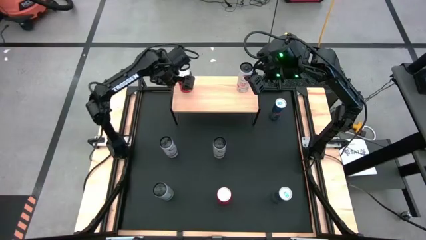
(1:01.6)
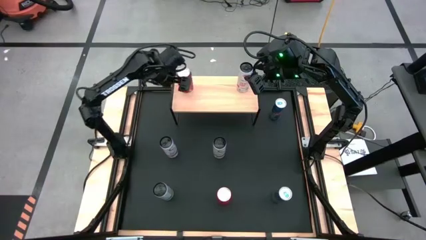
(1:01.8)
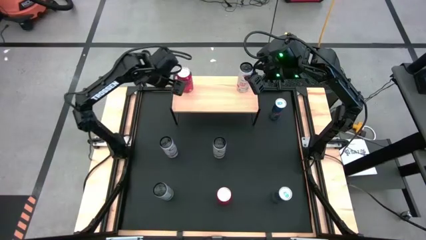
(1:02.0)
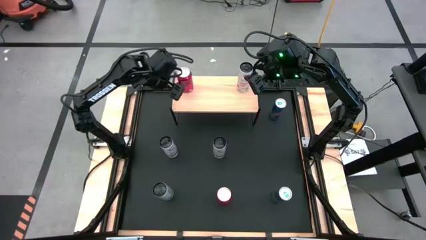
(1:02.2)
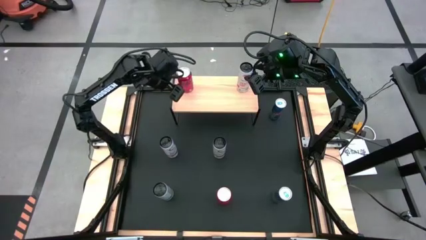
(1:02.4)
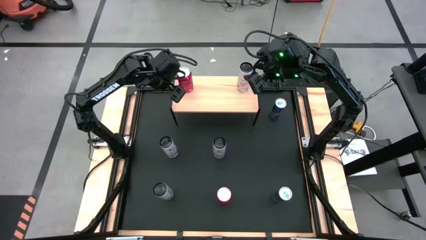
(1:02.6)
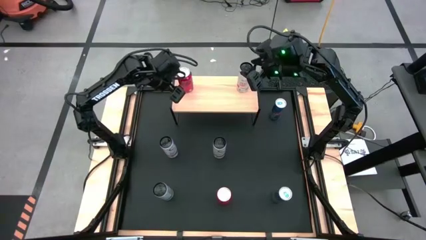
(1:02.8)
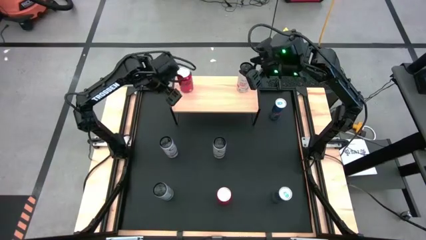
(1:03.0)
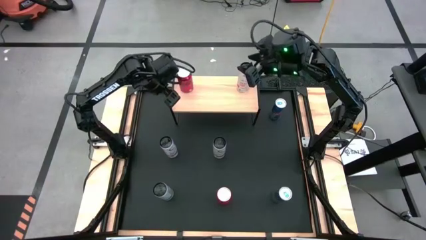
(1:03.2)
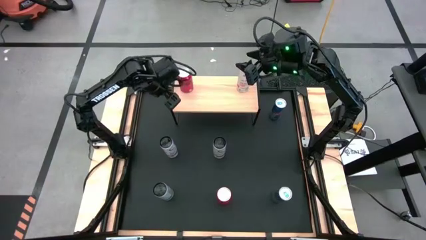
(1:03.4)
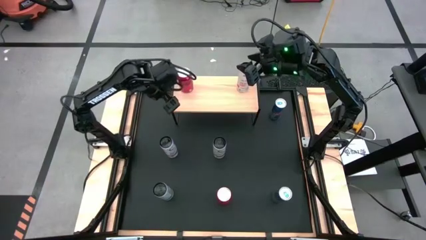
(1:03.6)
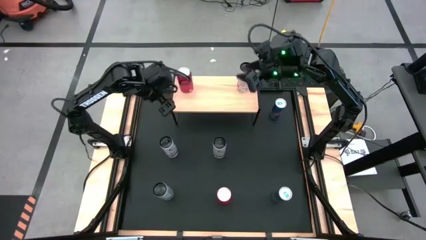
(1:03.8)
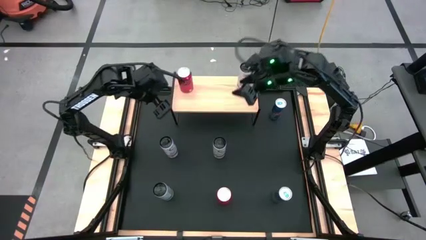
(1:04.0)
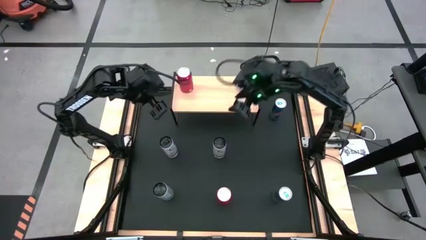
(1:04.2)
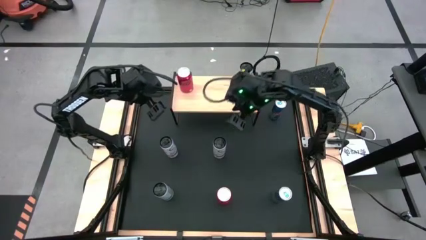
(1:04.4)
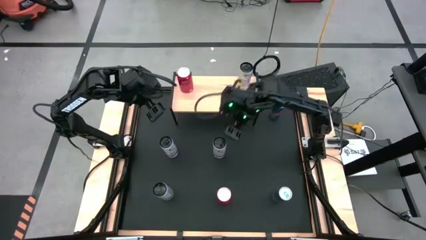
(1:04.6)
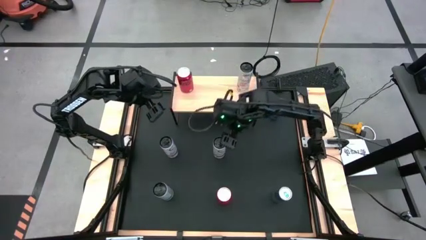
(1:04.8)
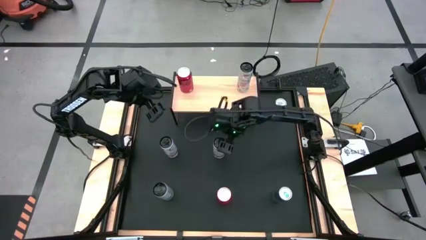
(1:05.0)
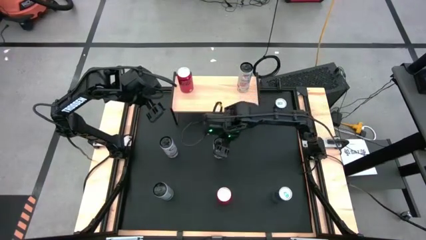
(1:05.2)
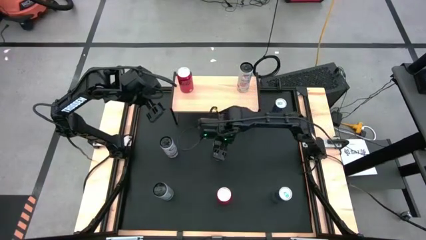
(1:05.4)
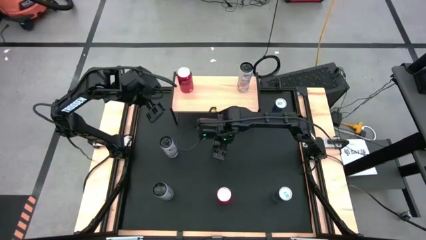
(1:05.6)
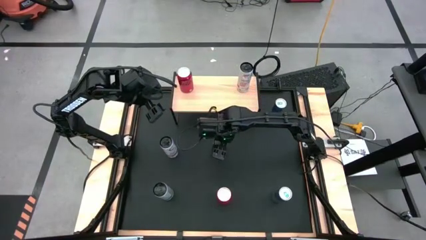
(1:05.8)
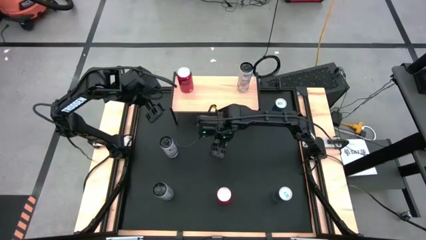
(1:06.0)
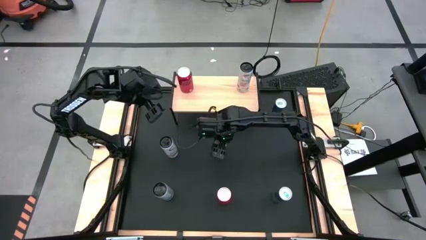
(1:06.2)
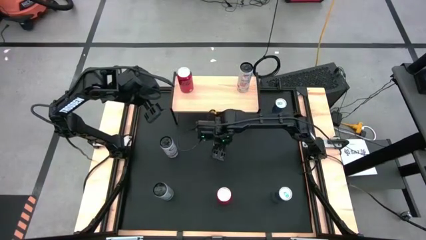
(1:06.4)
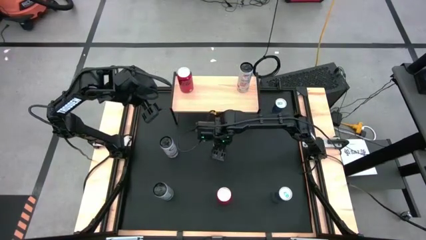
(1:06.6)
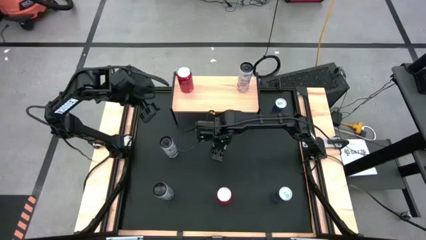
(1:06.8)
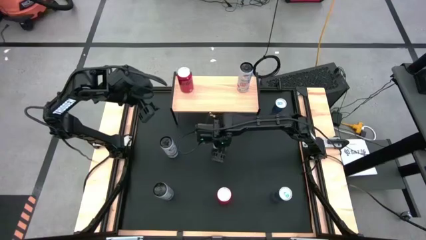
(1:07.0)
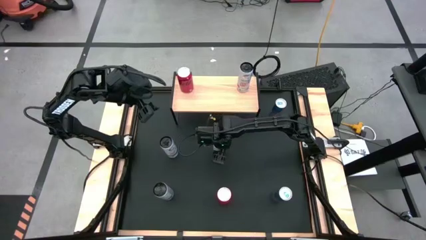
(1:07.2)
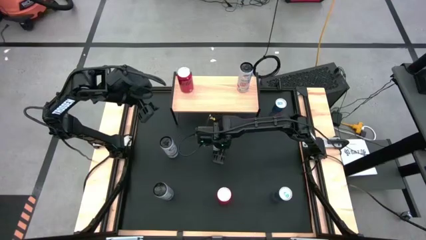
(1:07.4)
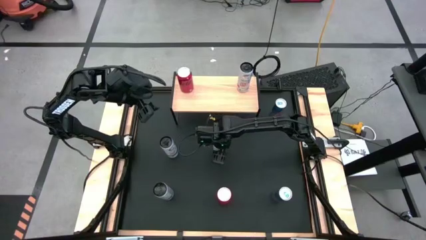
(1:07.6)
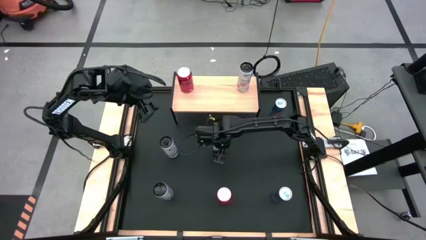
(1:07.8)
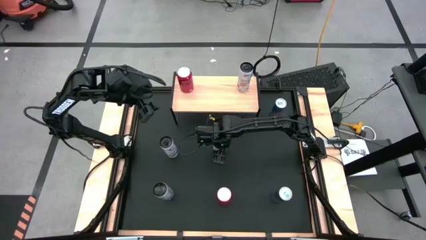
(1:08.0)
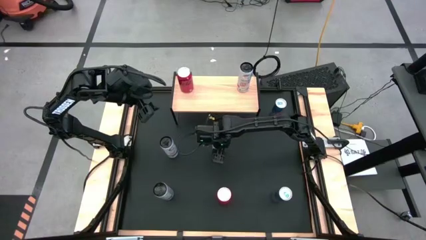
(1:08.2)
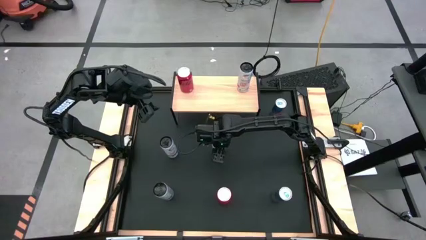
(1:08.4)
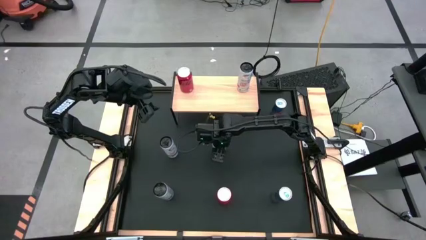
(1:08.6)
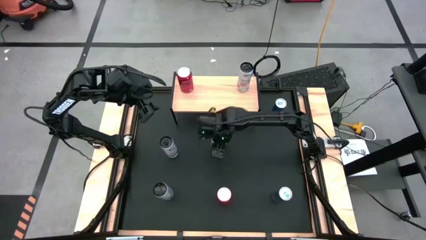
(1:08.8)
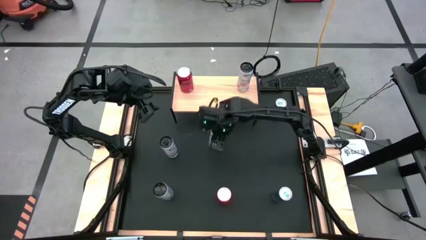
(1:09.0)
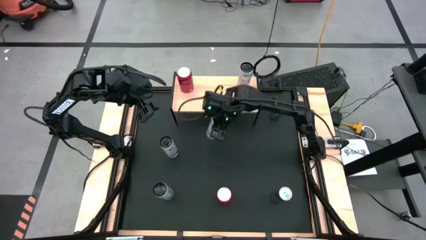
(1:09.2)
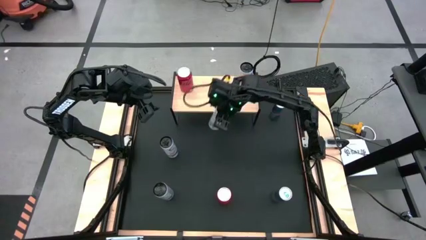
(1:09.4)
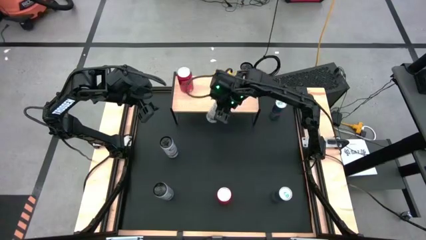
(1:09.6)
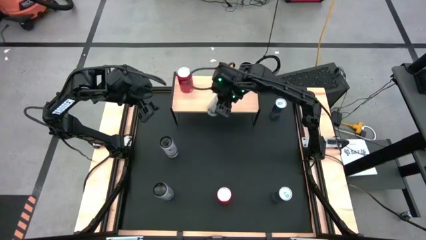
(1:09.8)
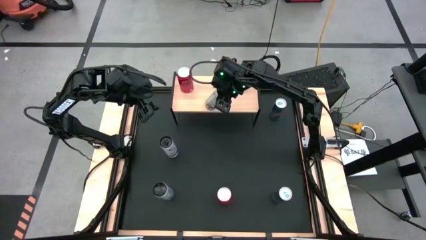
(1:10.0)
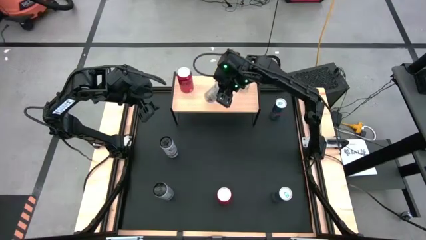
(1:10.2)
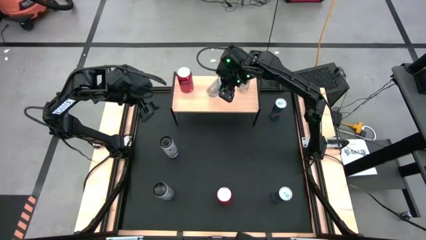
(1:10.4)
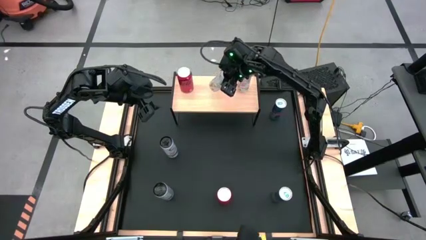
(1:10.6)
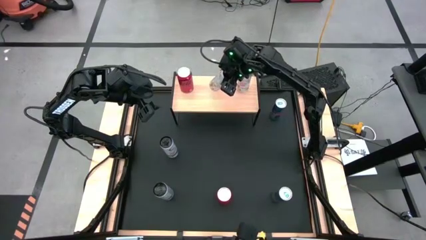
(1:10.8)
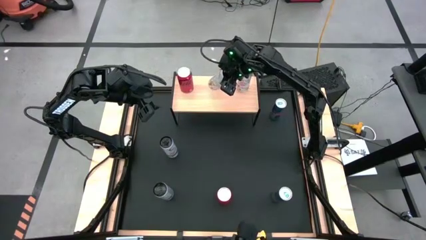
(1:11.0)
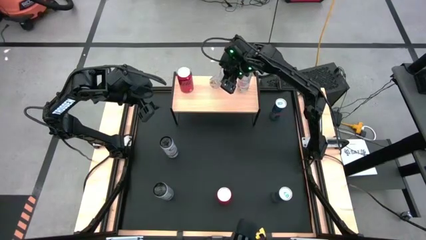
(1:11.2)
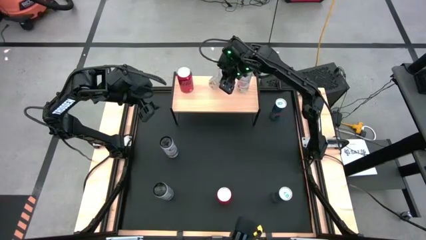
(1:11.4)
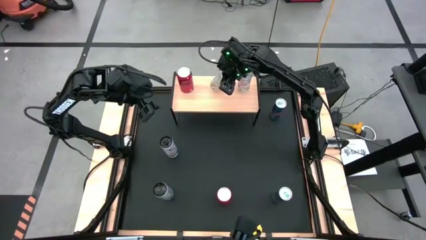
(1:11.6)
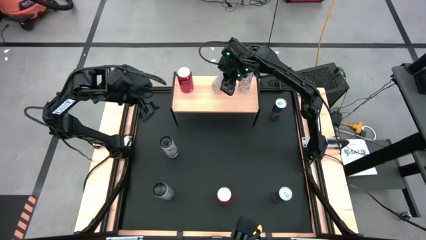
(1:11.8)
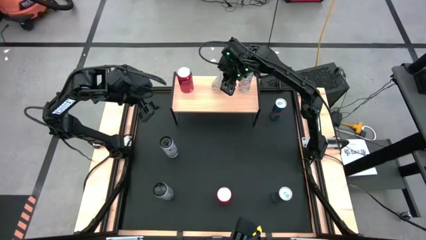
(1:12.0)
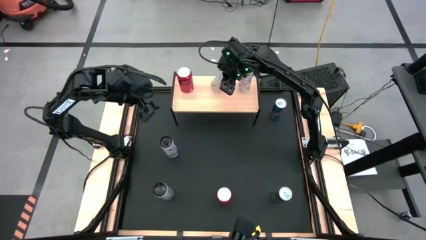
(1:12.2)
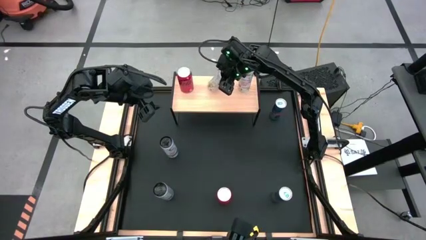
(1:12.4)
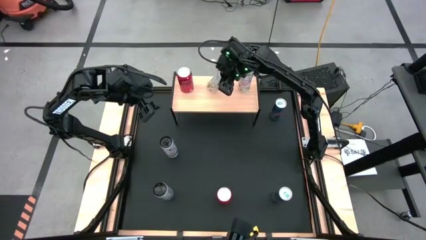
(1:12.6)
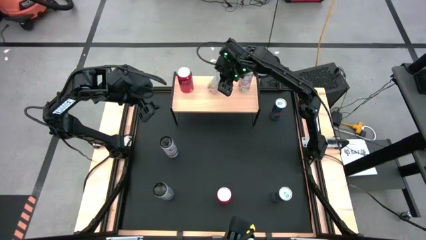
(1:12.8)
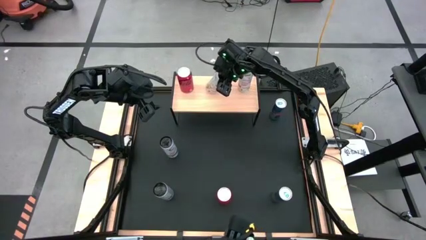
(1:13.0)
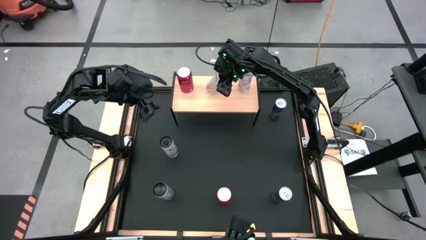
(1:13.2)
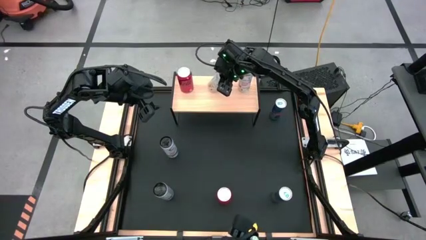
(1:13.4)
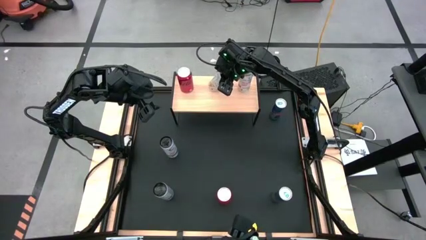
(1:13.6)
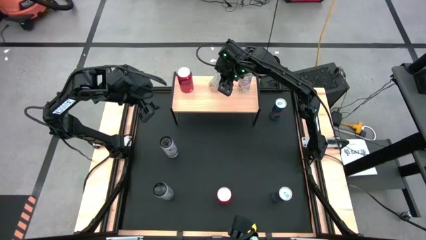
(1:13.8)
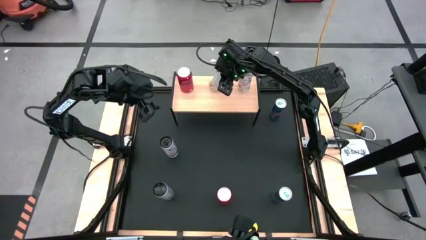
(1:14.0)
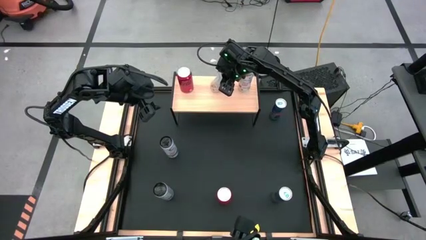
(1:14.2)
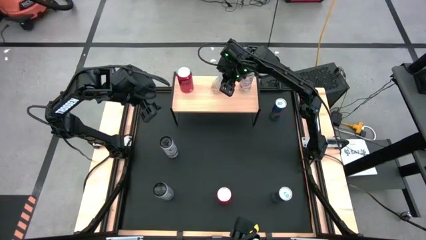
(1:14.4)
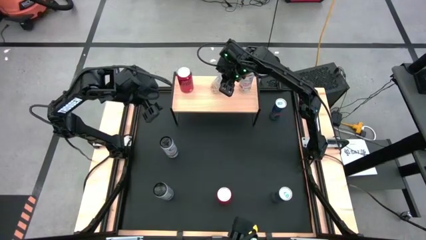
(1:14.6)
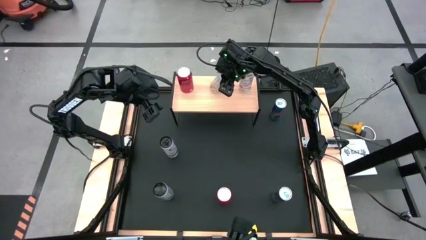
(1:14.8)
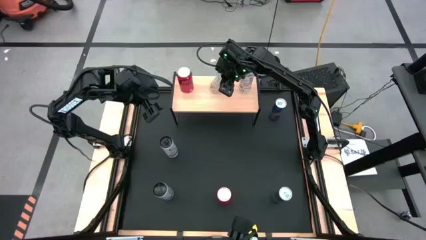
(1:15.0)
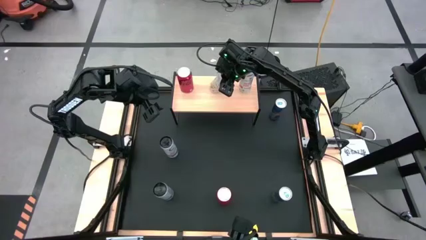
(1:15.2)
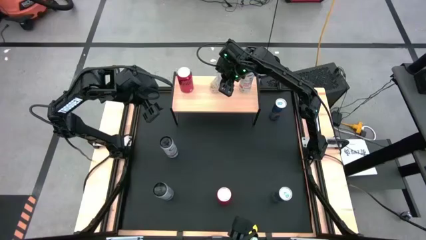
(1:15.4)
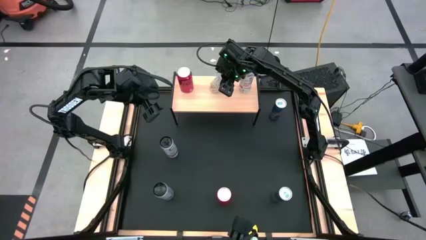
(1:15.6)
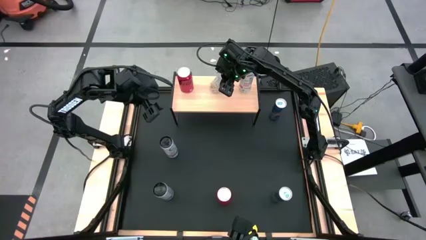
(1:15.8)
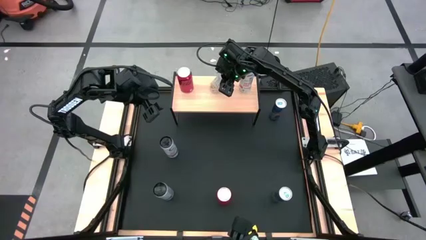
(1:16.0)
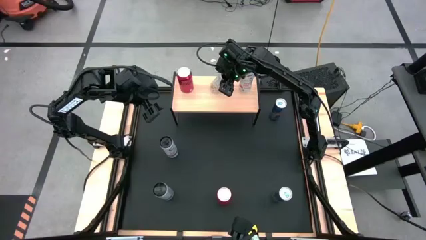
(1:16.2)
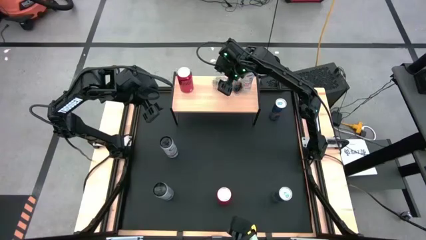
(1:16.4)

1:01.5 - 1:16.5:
Task: Place canned beverage on shelf
Put the top white yellow soda can on the shelf

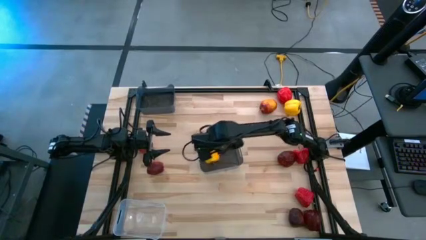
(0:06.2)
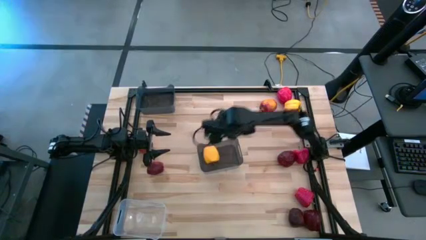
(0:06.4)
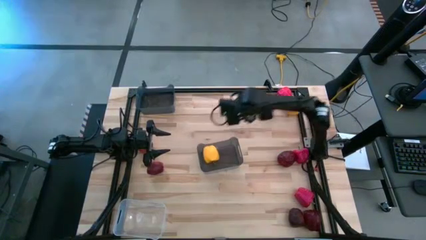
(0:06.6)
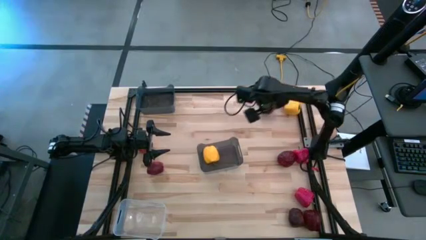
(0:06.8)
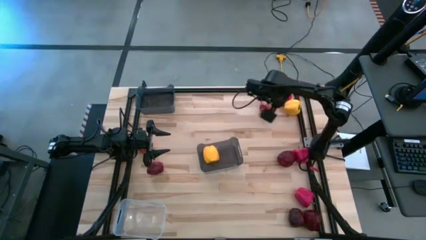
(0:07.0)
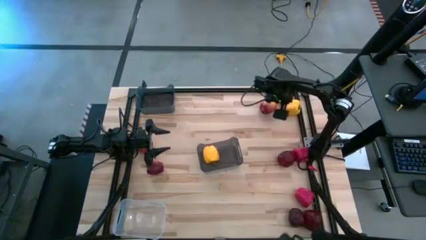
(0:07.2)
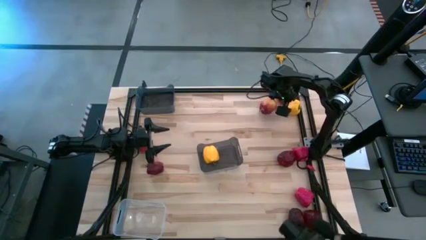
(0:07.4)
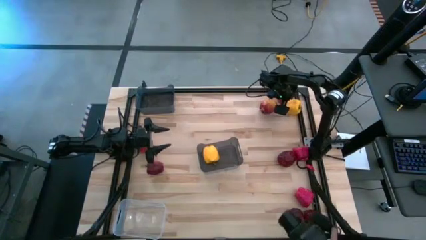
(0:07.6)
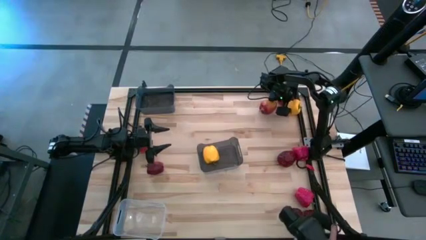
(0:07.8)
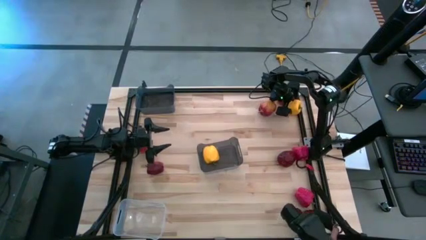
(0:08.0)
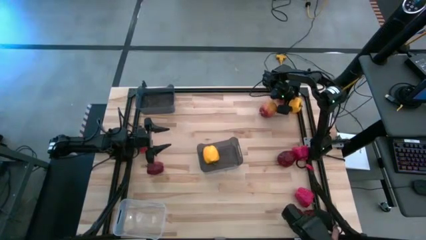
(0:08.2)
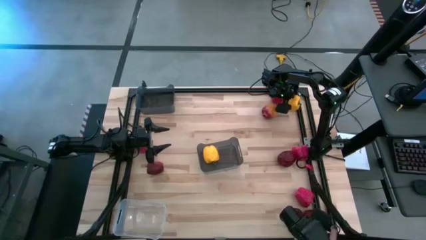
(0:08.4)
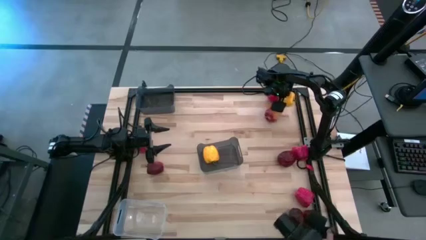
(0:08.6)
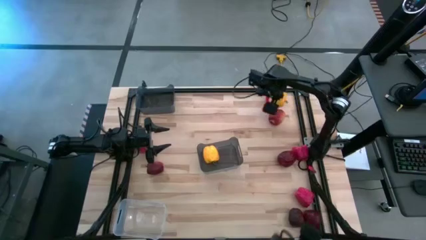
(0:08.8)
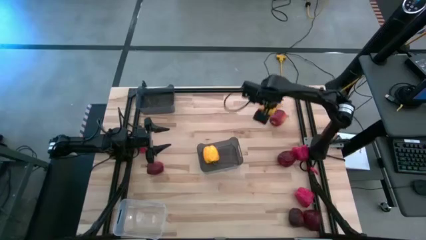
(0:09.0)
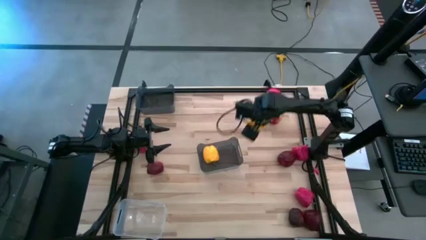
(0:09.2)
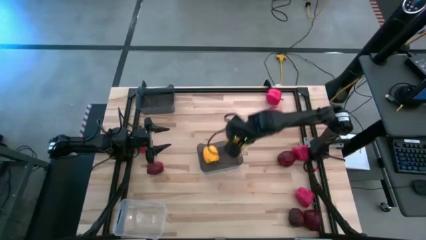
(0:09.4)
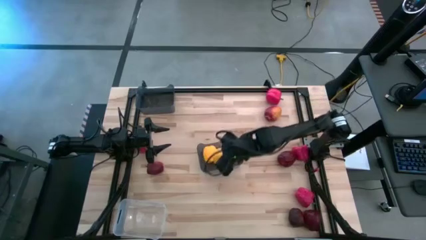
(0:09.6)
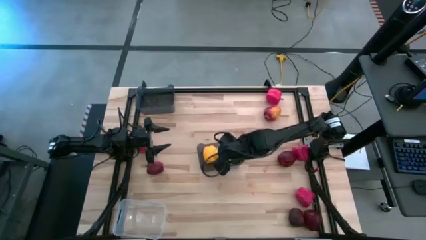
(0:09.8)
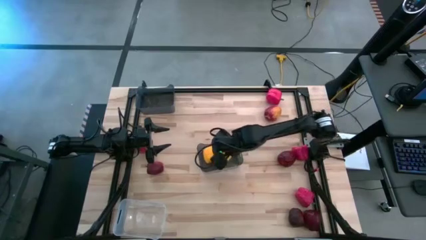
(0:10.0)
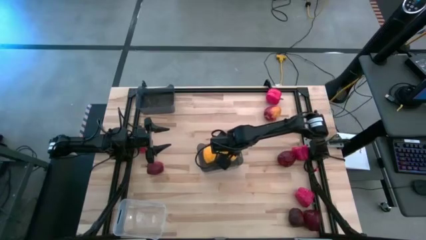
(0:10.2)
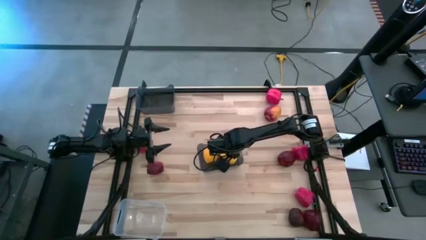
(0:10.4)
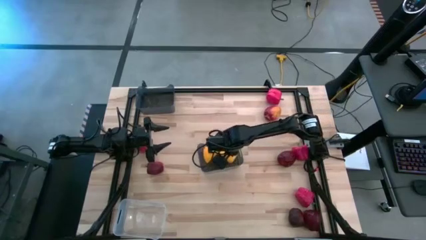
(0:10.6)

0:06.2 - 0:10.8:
Task: Sort produce into baskets
Put the yellow bell pepper into the bottom black bin
